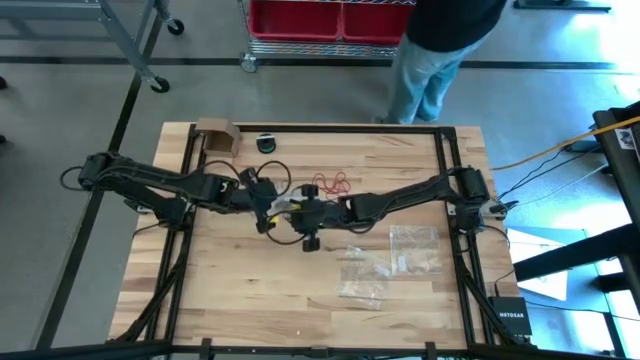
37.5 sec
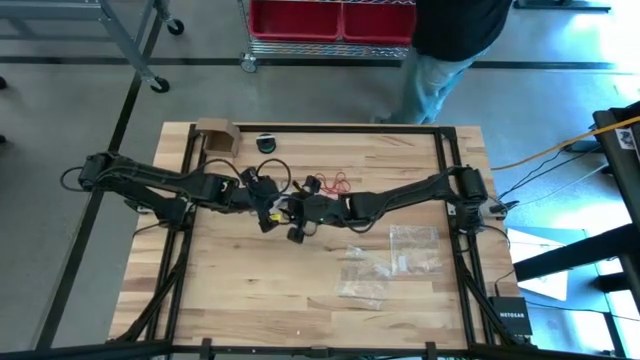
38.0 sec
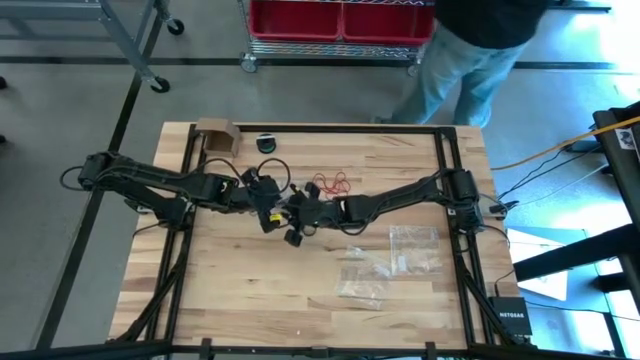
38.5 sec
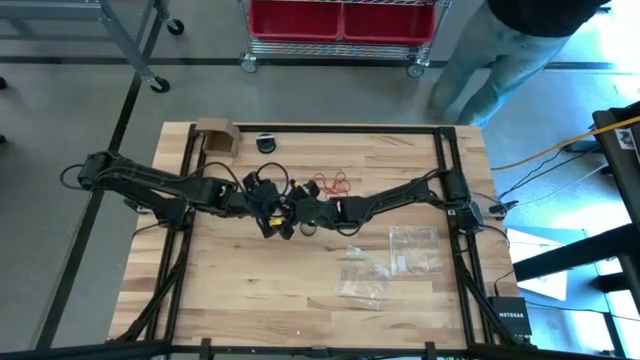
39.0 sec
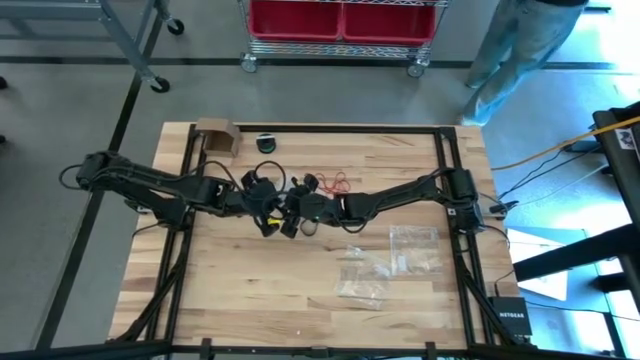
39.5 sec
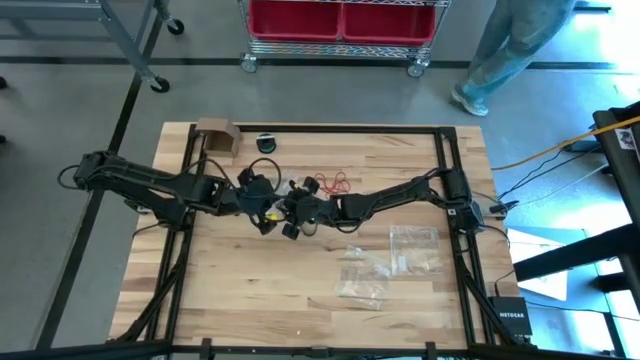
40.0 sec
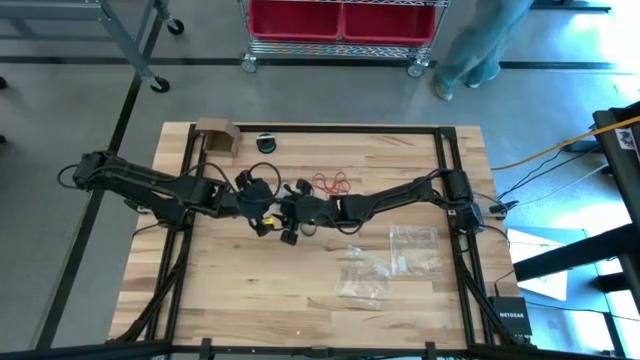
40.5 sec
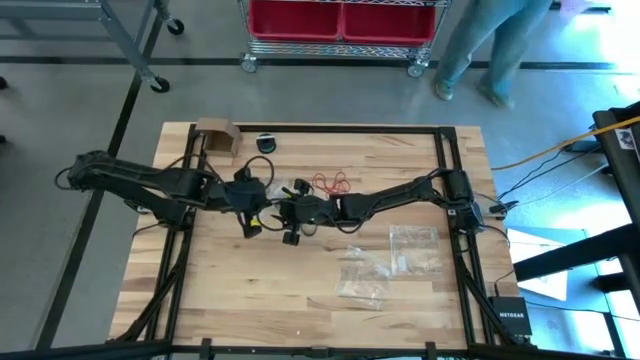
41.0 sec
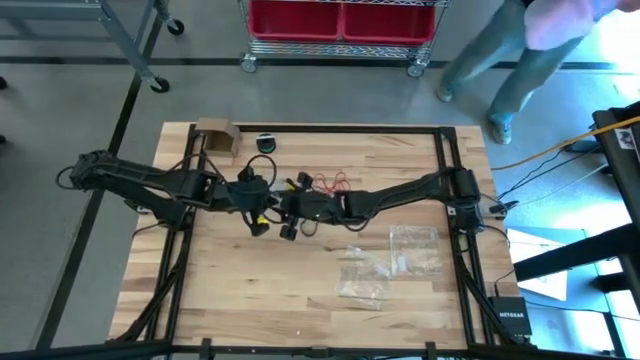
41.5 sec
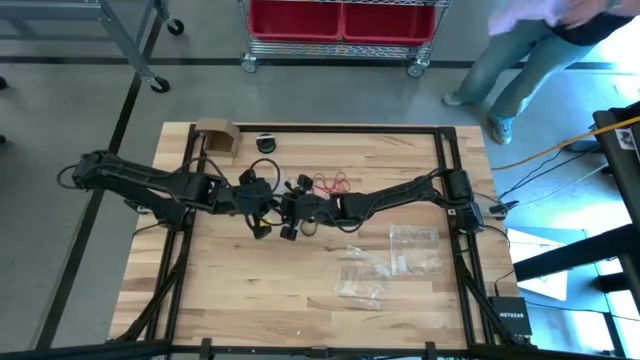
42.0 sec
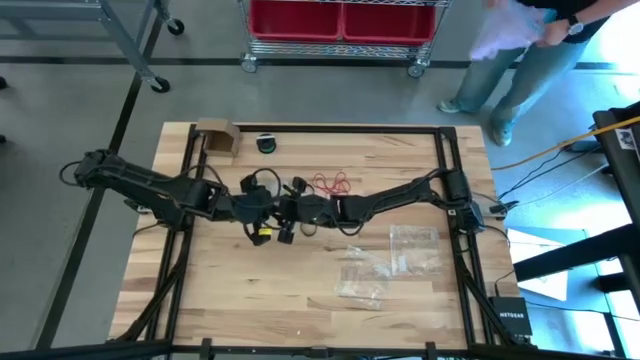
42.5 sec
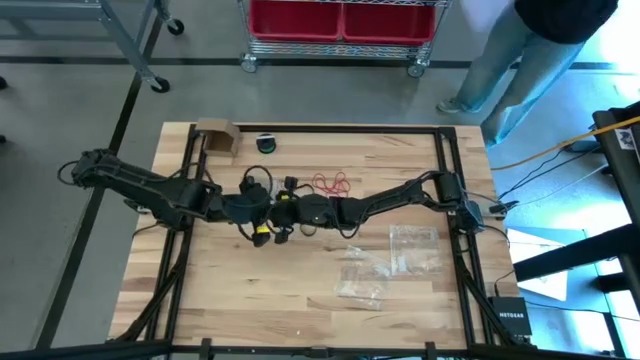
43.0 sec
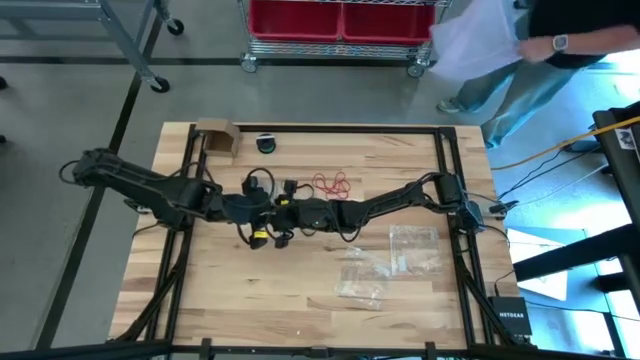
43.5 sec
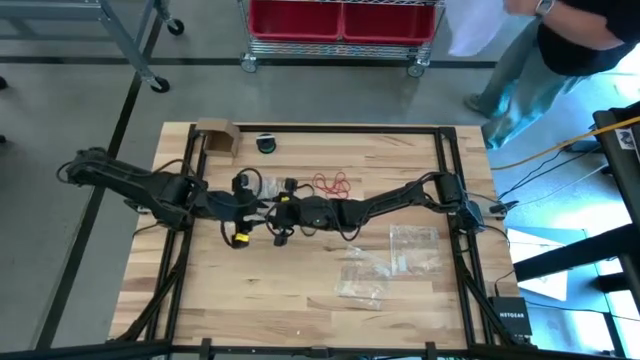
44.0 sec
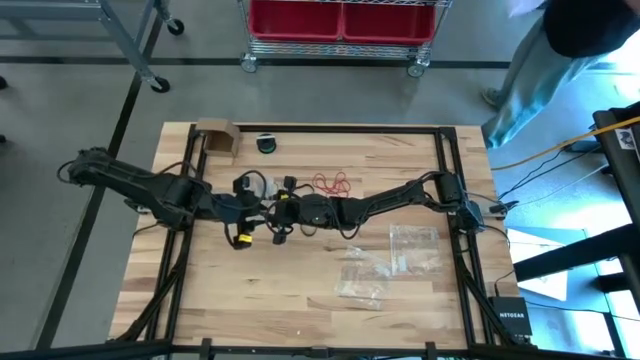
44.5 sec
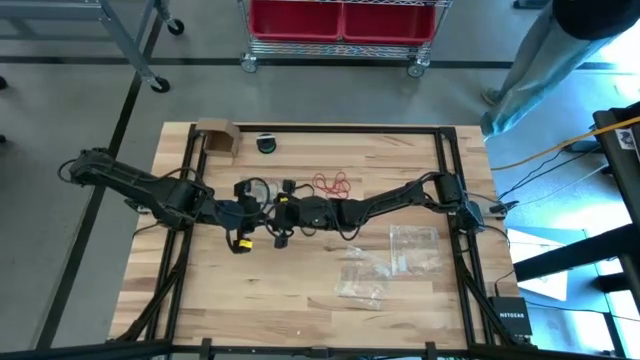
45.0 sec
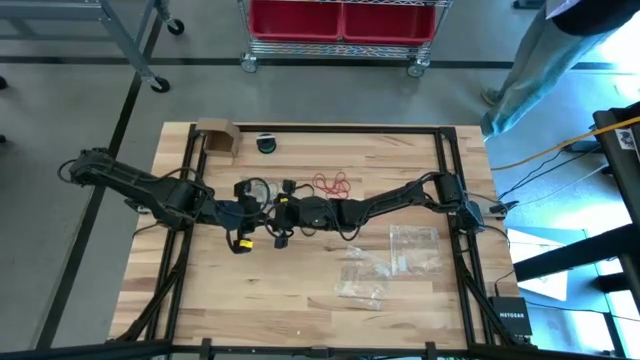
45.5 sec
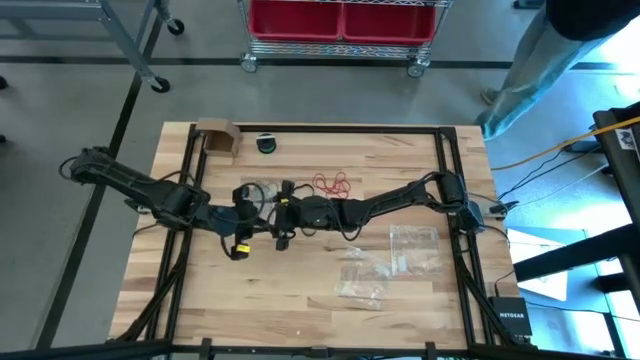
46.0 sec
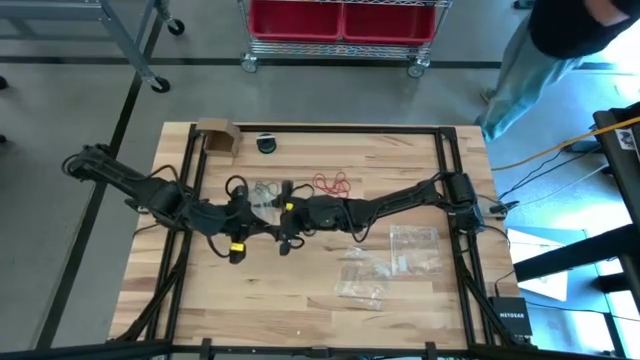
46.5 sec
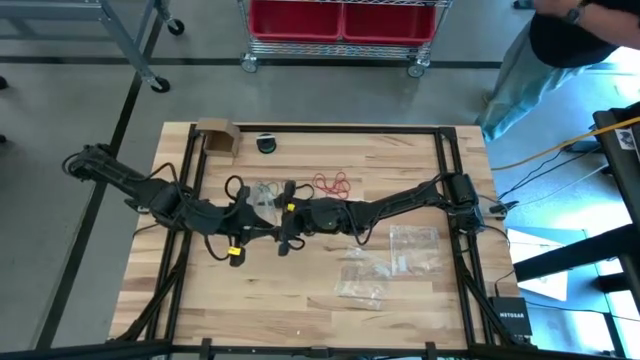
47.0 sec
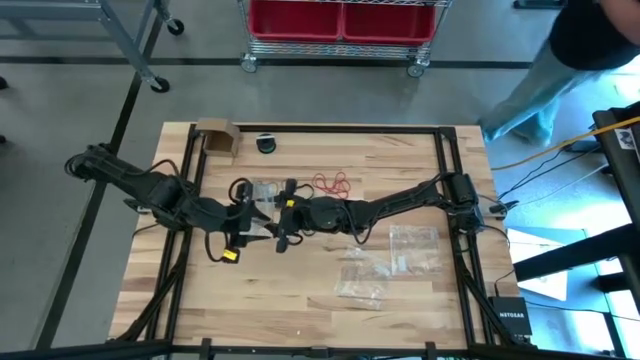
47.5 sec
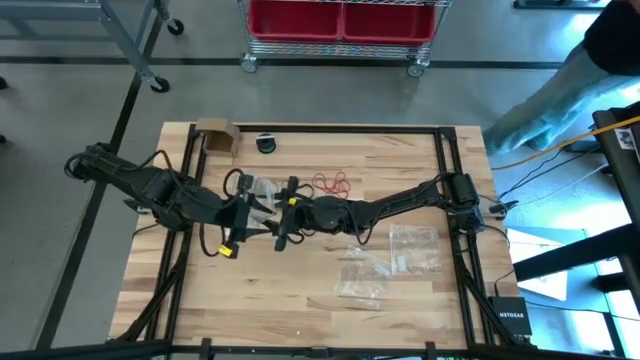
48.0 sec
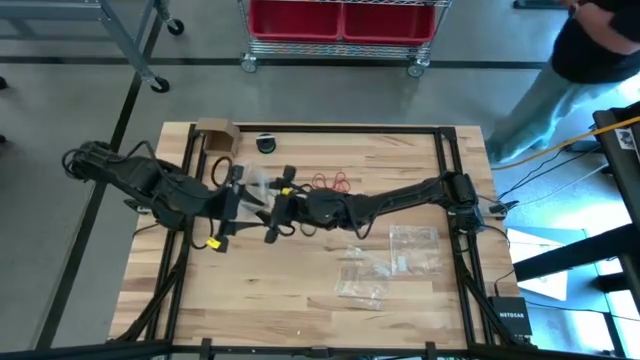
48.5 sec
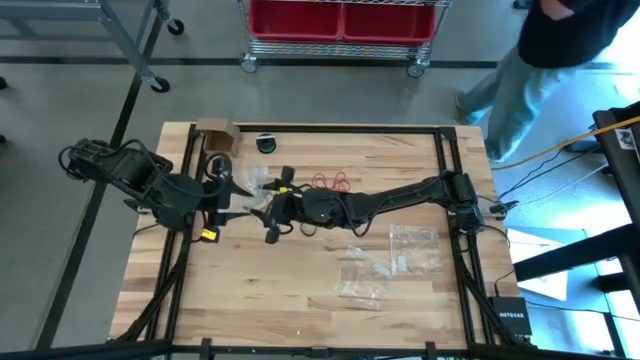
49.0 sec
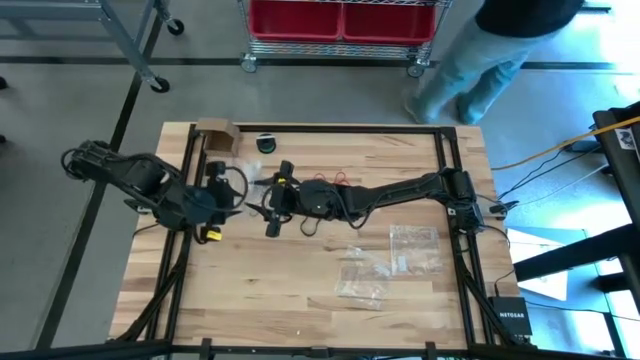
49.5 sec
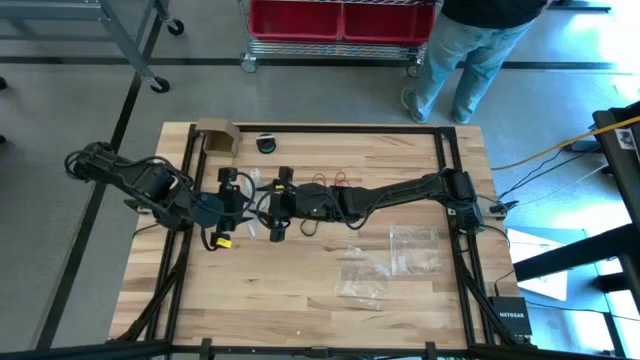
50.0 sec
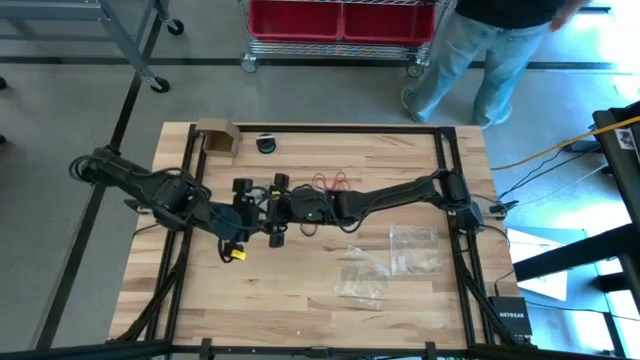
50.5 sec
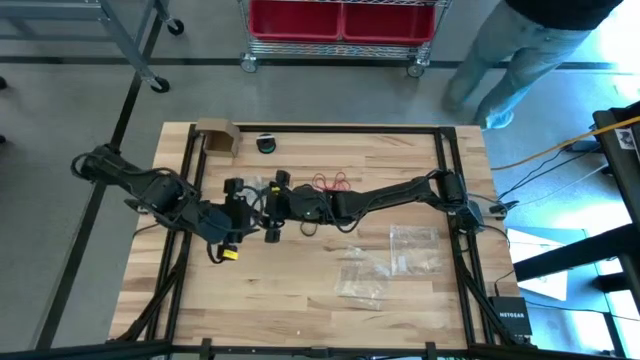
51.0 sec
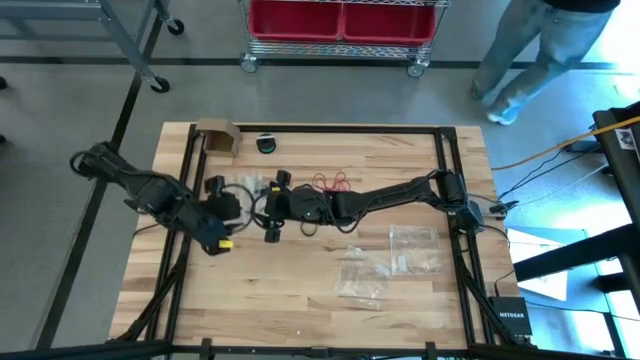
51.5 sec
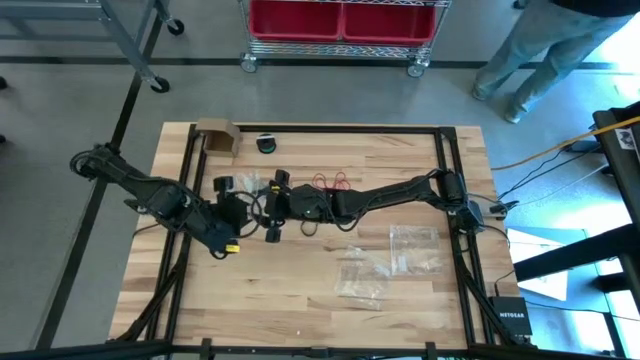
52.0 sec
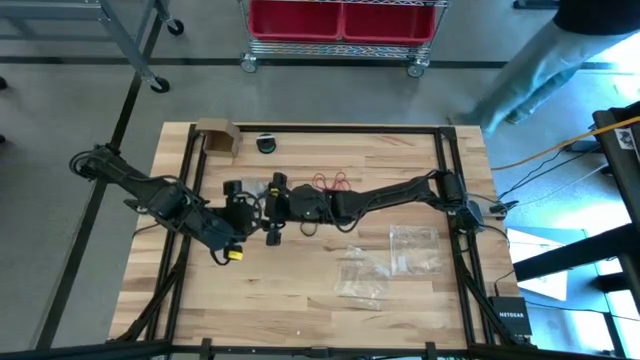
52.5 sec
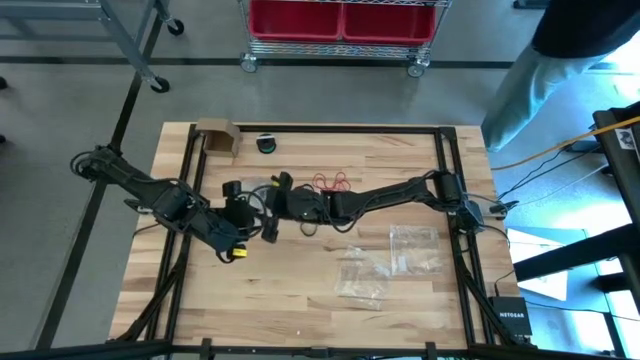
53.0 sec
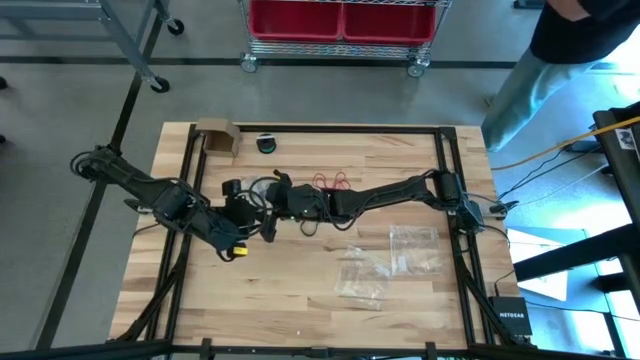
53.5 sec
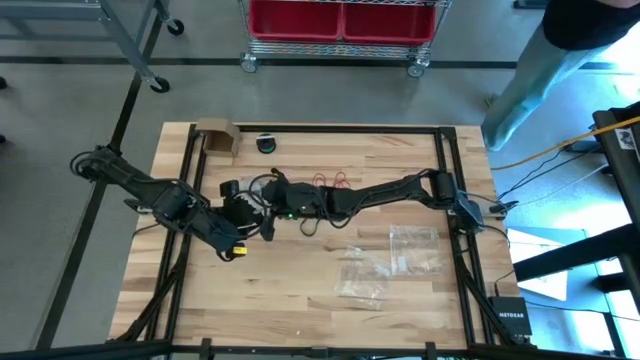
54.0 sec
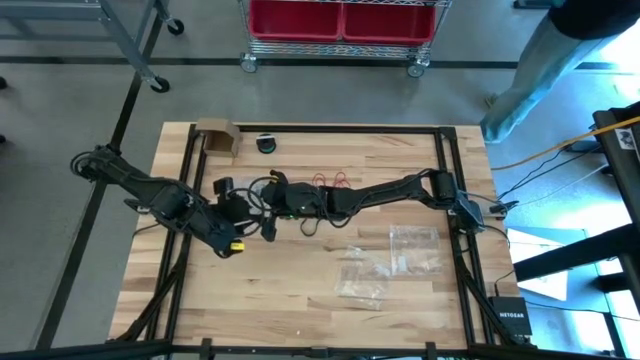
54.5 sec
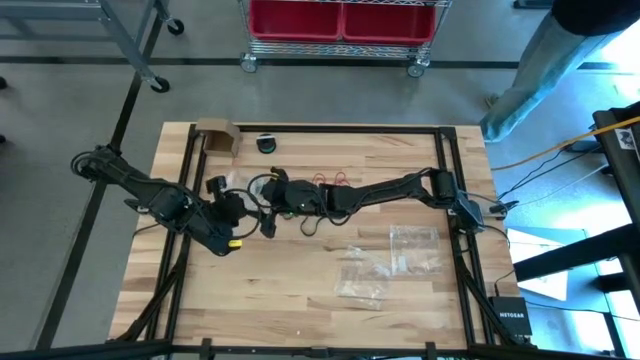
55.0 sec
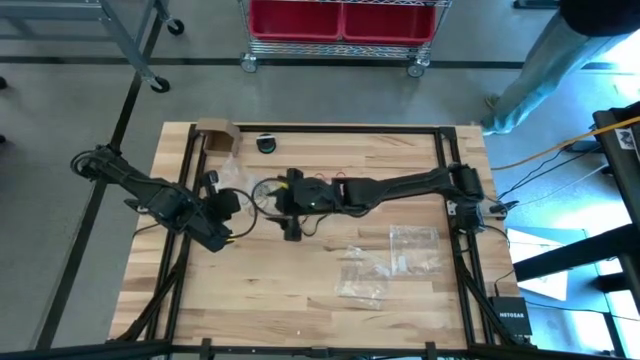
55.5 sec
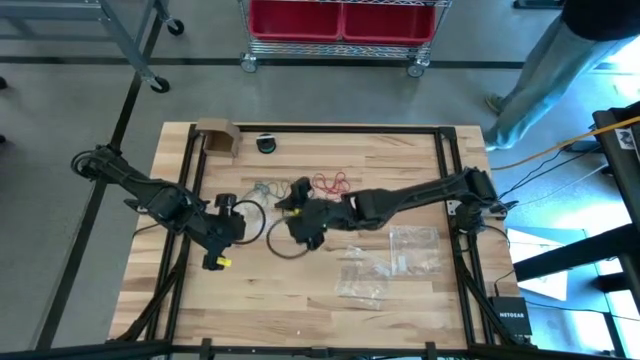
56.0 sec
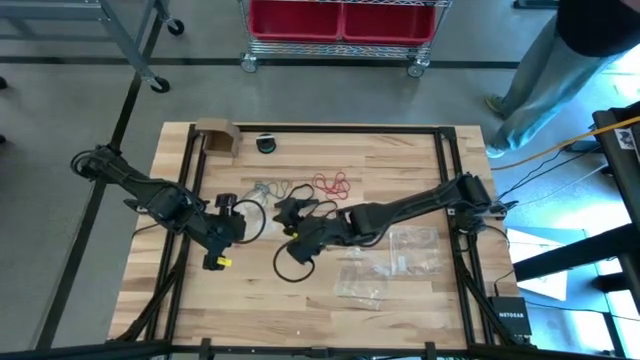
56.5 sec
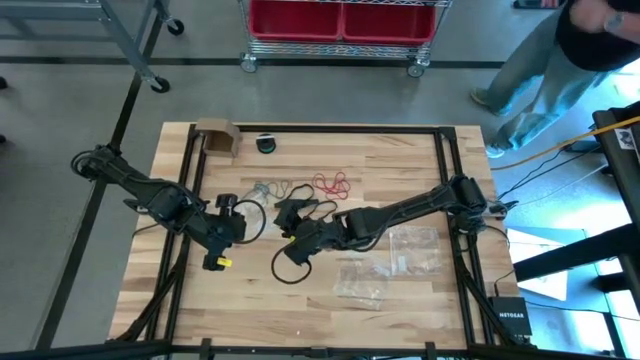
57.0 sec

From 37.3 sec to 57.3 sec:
Task: Sort rubber bands
Put the black rubber band into the transparent zip bag

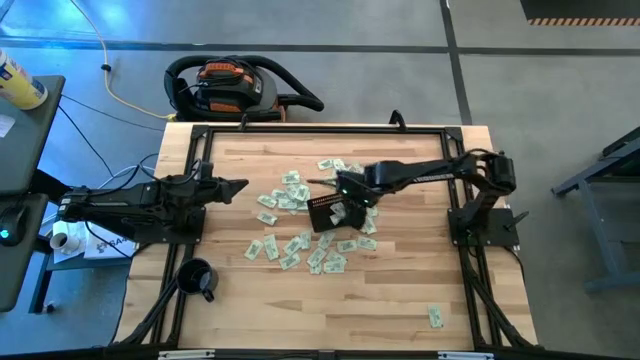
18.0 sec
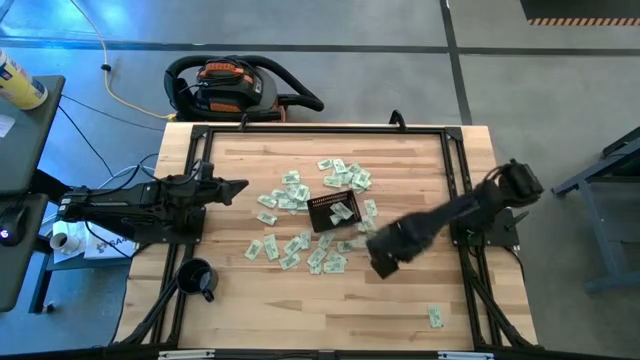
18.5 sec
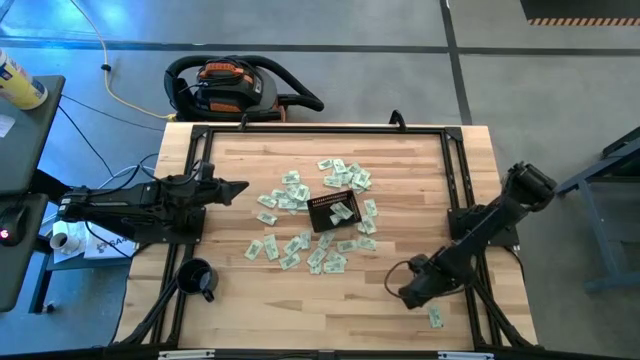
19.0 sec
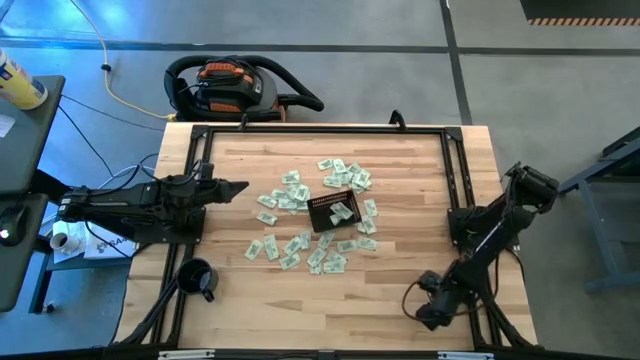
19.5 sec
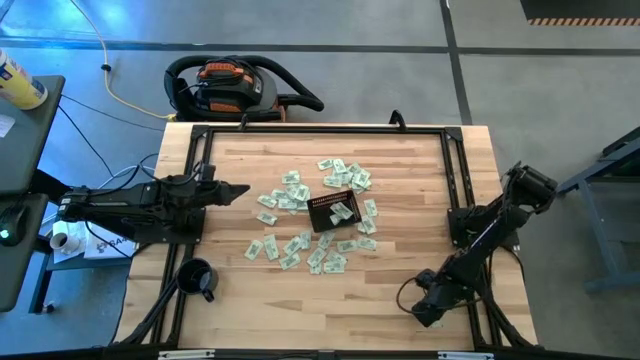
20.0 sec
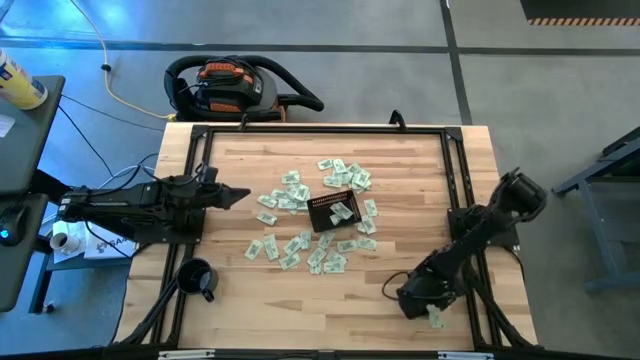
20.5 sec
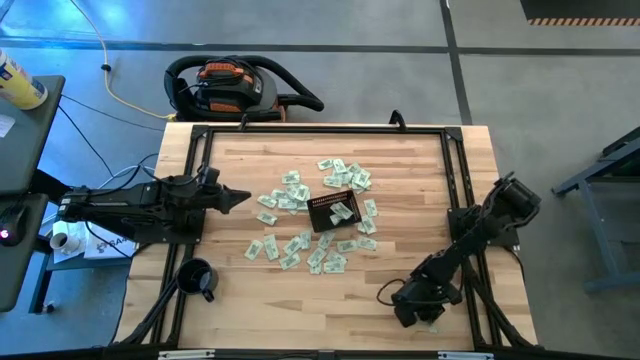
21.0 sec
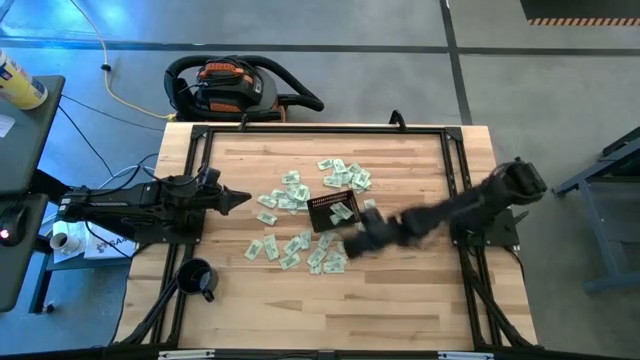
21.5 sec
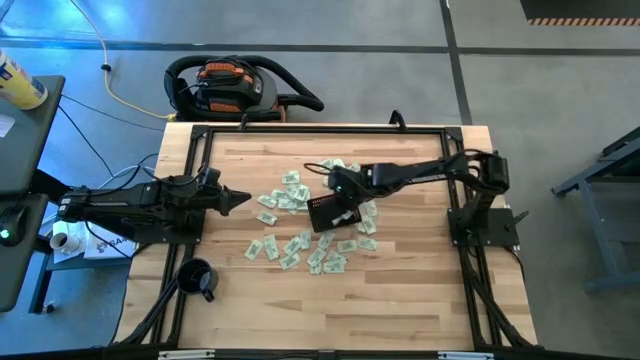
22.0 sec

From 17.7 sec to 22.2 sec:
Task: Pick and place Stevia / Truvia into bins
Put the green stevia packet into the black bin
